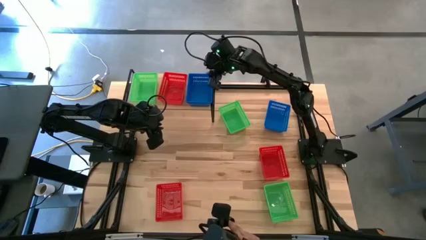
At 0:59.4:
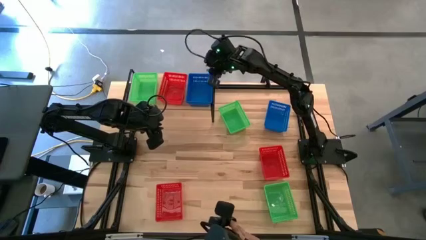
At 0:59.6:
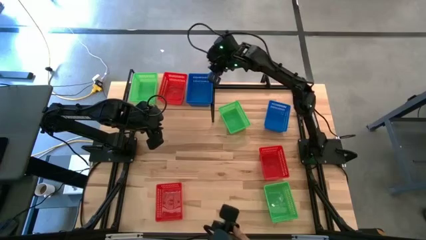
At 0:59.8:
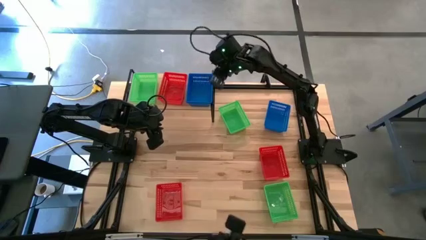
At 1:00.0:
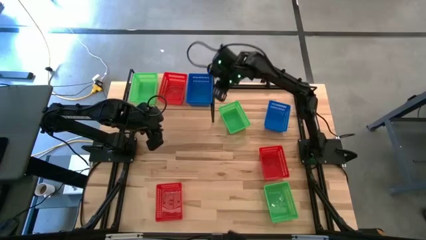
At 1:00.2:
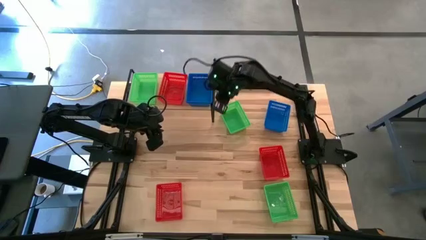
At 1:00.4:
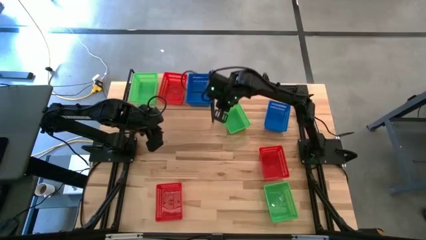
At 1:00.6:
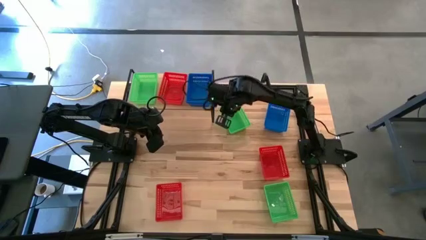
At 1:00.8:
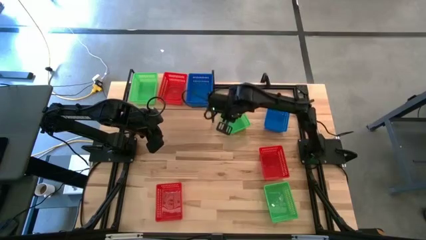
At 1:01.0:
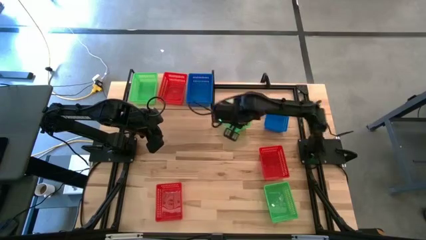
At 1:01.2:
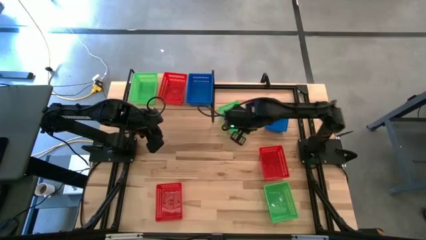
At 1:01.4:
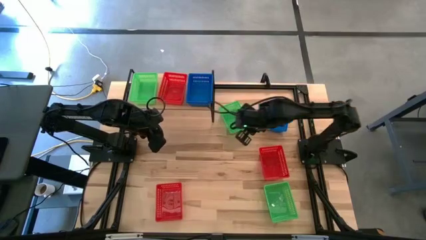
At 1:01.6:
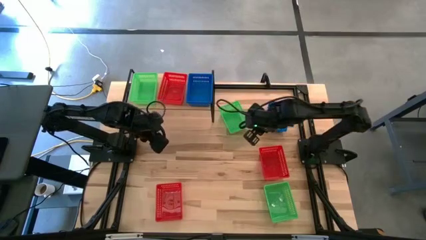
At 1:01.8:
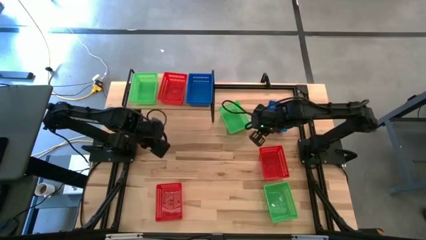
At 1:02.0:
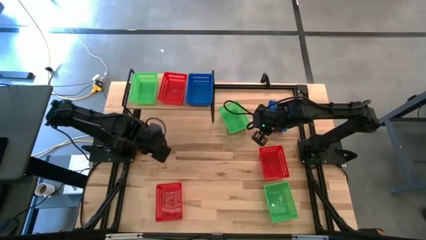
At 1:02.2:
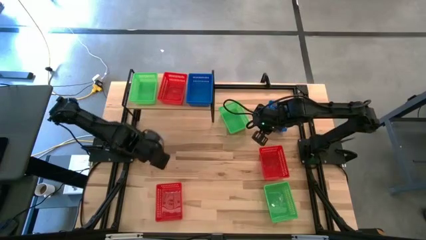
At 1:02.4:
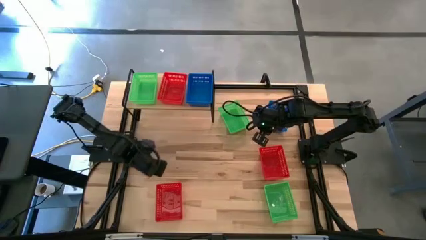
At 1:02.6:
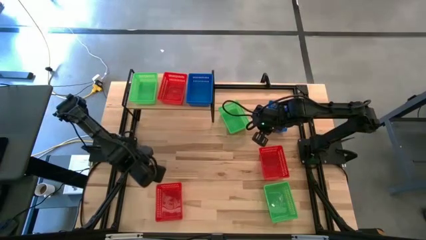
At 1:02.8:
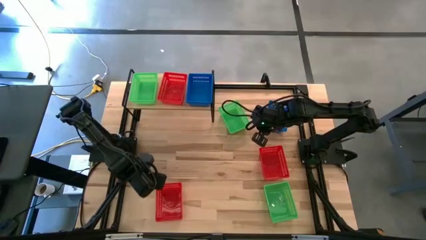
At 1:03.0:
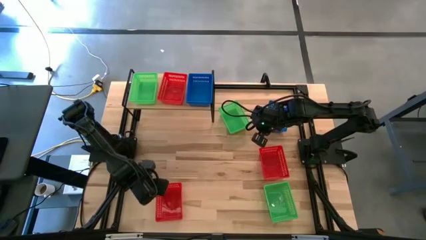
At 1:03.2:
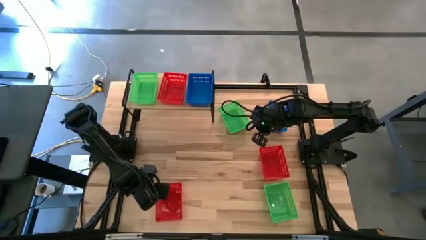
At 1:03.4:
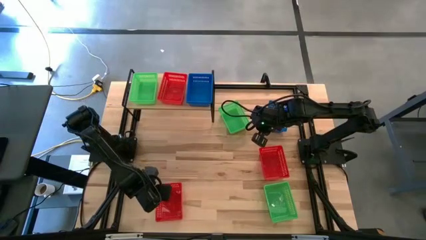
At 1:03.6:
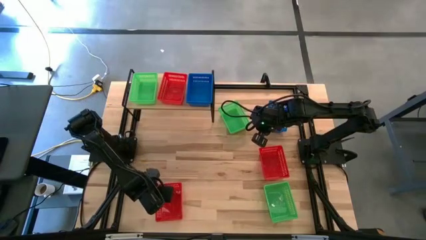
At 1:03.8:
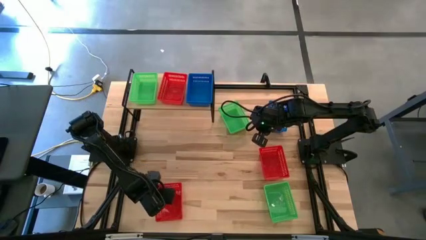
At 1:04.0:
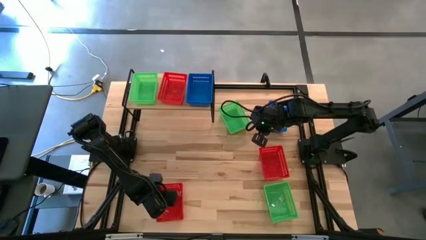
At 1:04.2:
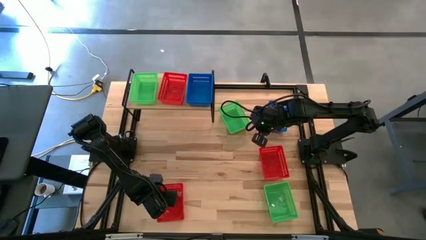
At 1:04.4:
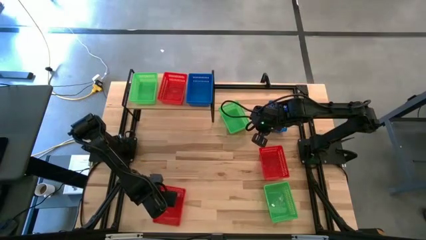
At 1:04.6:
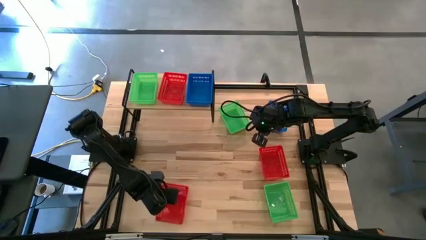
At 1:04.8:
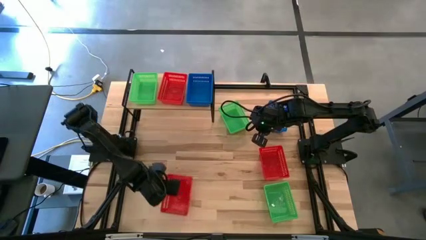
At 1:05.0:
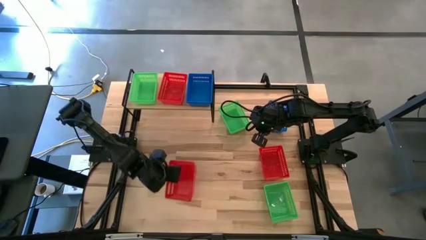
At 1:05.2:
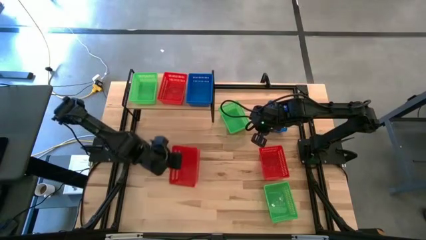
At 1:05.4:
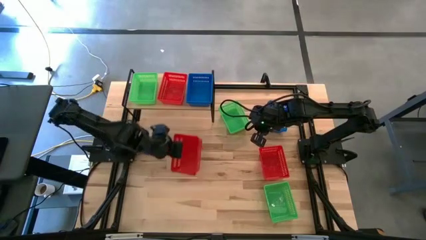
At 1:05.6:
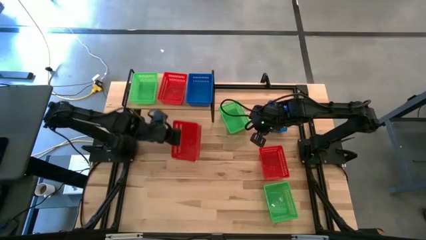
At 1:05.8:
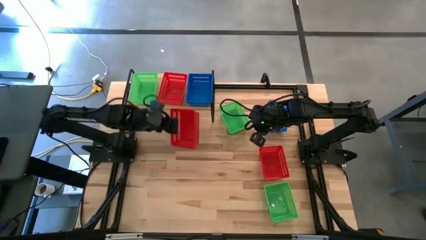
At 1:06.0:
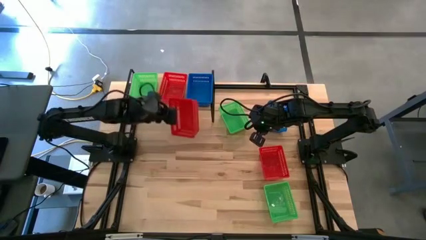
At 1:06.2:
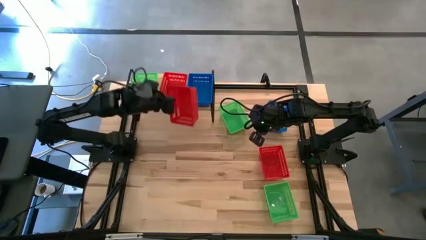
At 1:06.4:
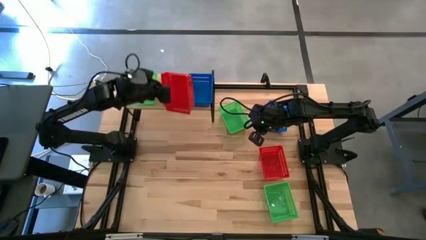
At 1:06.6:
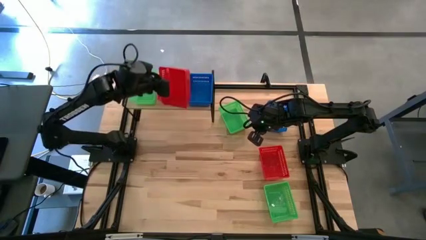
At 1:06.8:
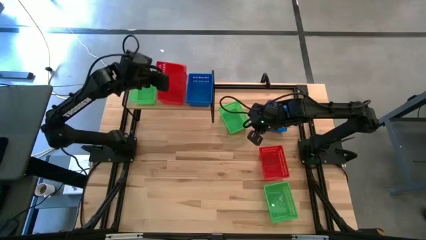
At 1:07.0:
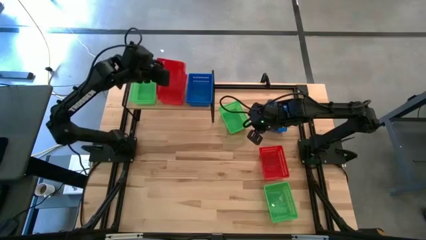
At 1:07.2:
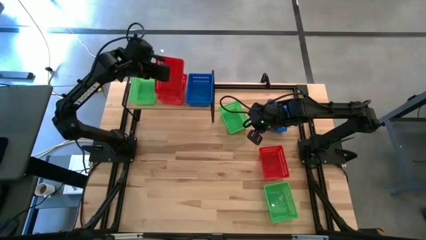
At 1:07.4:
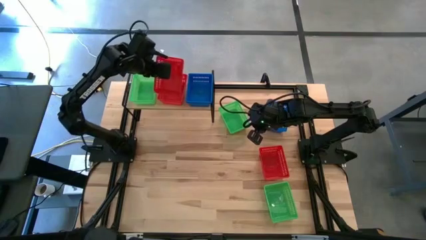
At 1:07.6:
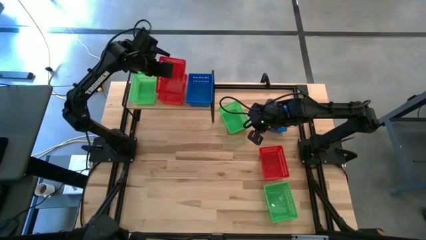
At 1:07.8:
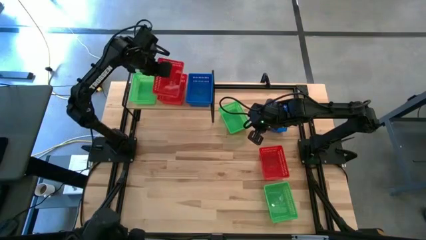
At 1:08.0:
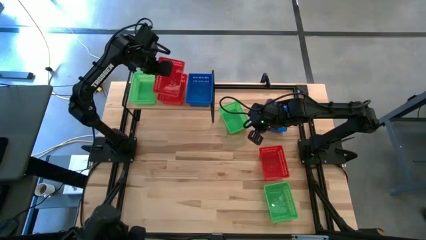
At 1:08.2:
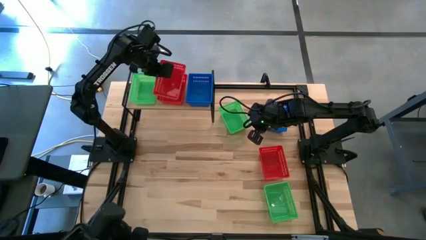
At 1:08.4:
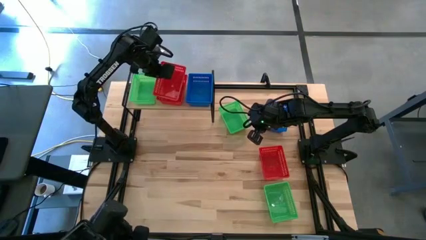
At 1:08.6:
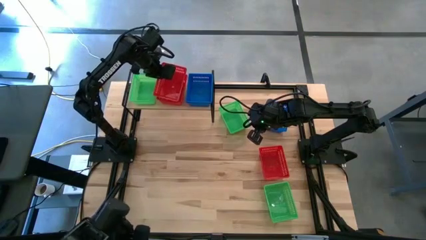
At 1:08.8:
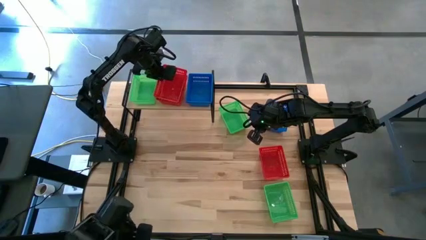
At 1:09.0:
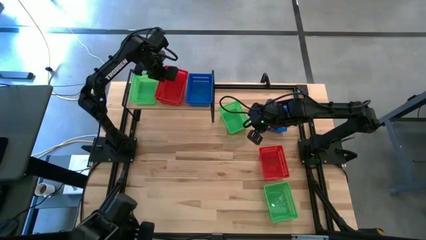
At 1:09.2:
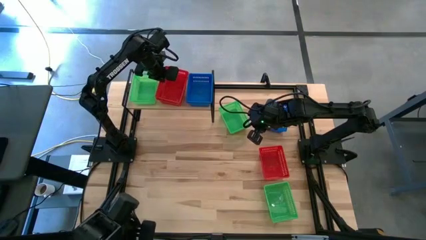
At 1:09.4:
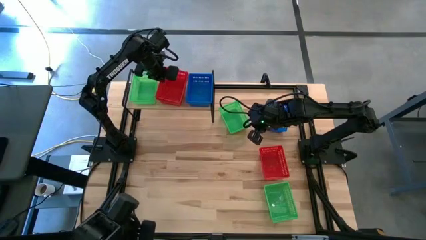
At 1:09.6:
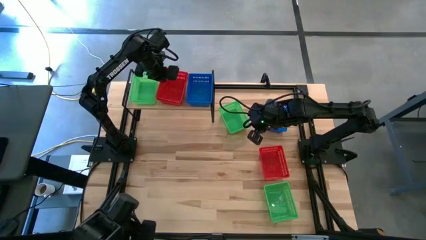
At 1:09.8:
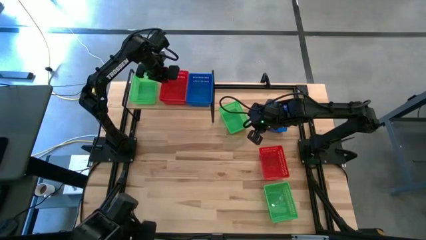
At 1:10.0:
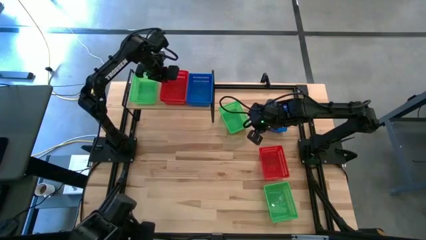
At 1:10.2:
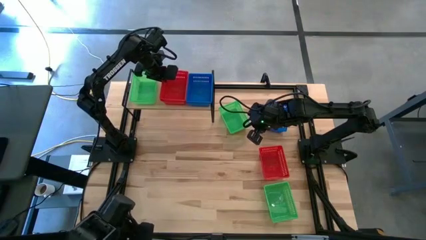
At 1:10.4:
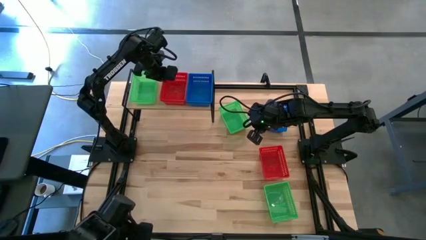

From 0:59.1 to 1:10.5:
Task: Stack baskets on shelf by color
Stack the bottom red basket on top of the red basket on the shelf
